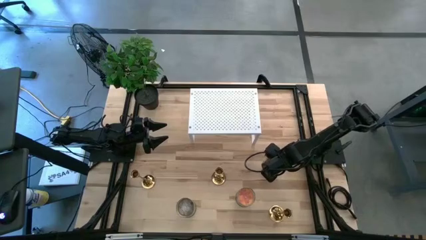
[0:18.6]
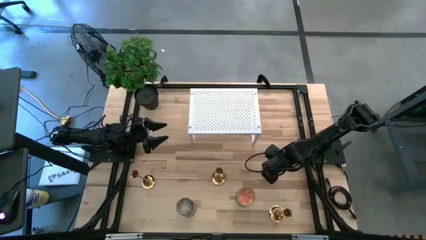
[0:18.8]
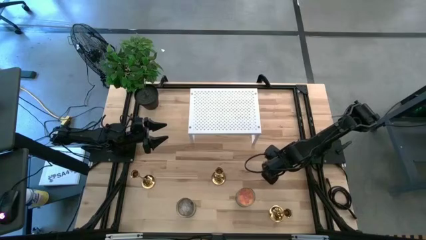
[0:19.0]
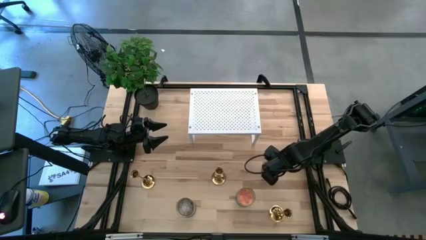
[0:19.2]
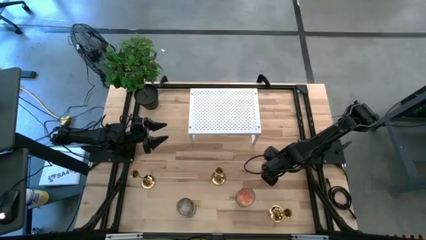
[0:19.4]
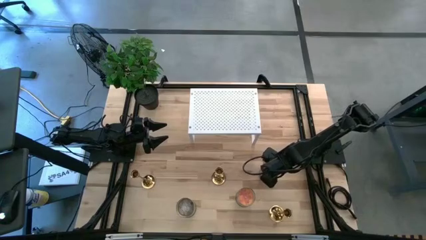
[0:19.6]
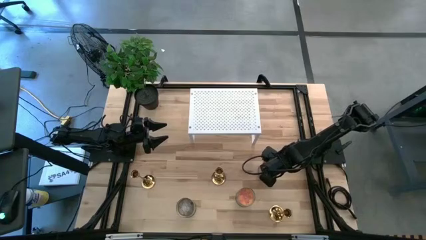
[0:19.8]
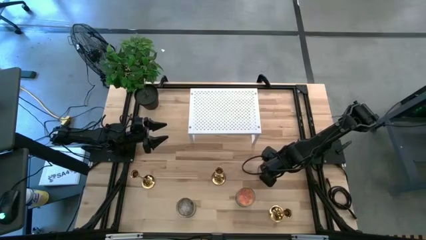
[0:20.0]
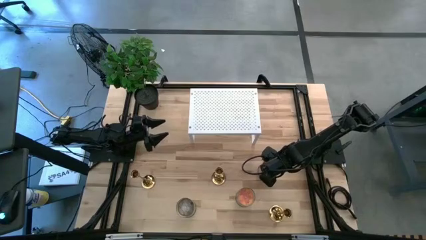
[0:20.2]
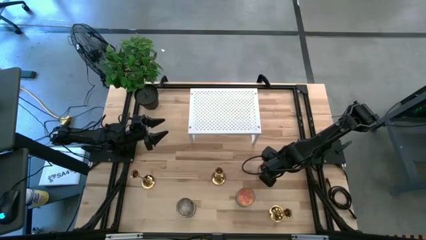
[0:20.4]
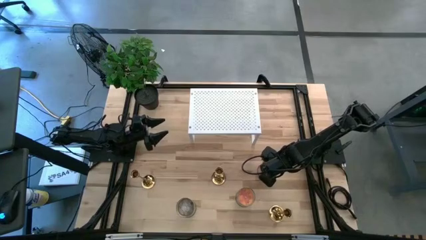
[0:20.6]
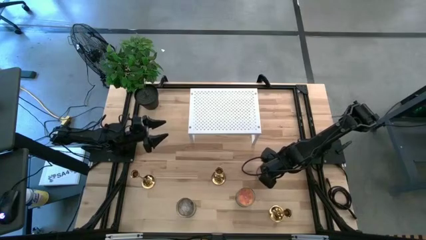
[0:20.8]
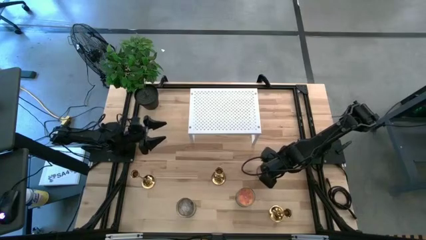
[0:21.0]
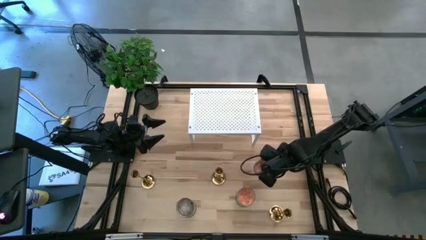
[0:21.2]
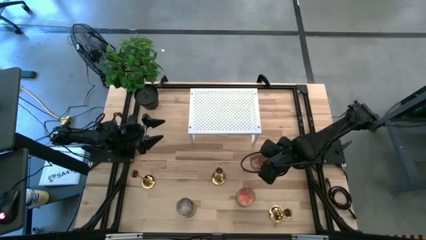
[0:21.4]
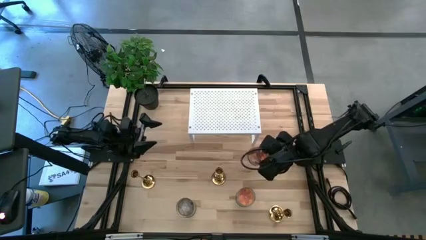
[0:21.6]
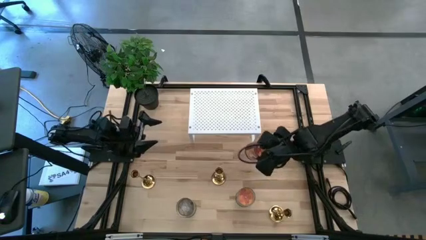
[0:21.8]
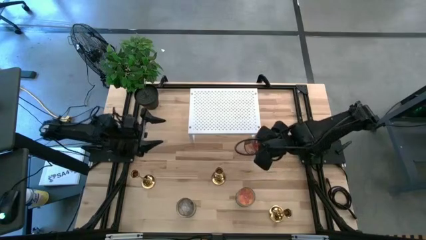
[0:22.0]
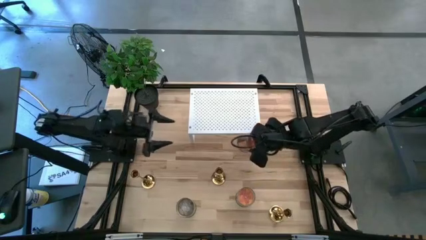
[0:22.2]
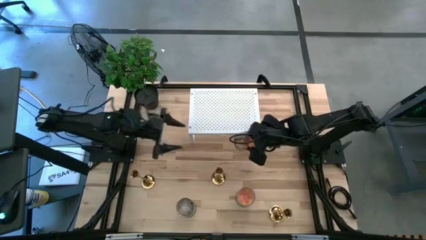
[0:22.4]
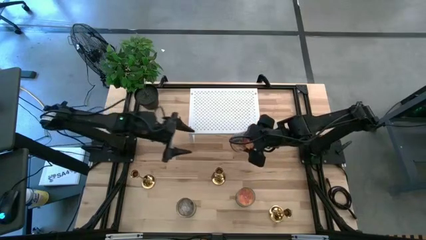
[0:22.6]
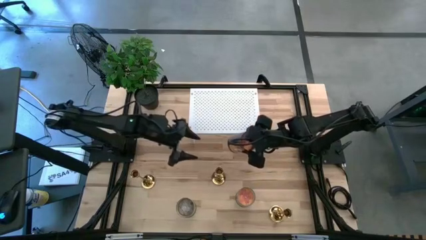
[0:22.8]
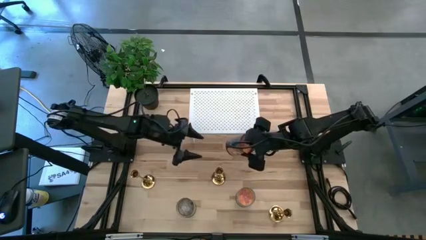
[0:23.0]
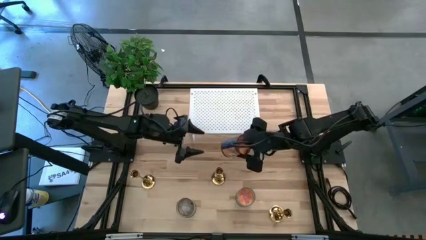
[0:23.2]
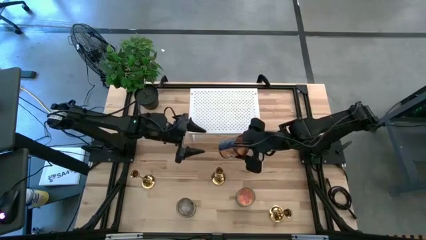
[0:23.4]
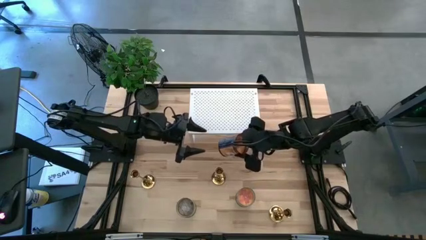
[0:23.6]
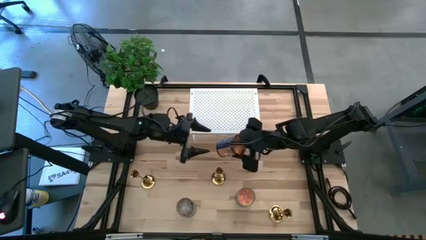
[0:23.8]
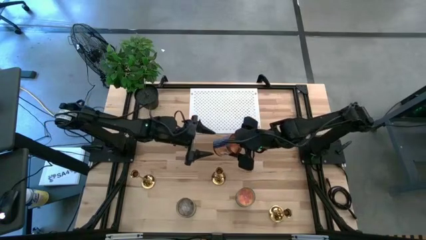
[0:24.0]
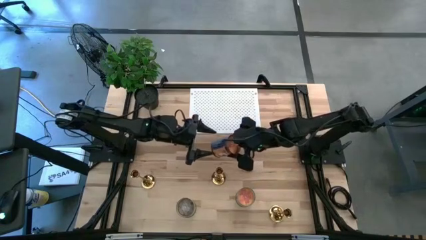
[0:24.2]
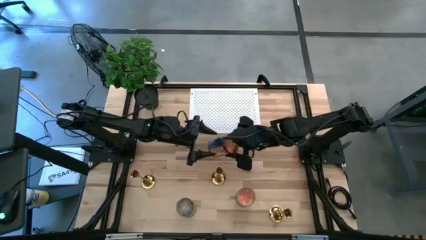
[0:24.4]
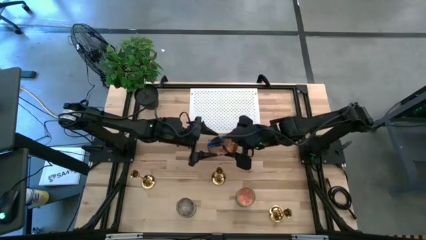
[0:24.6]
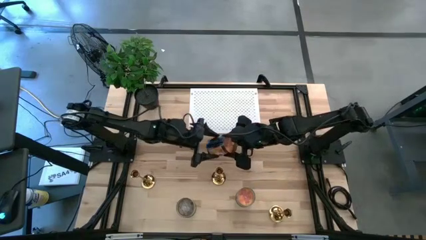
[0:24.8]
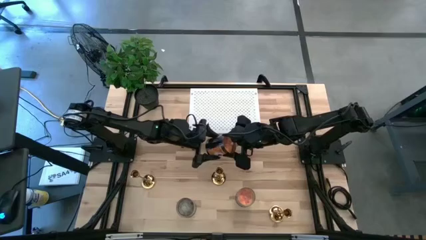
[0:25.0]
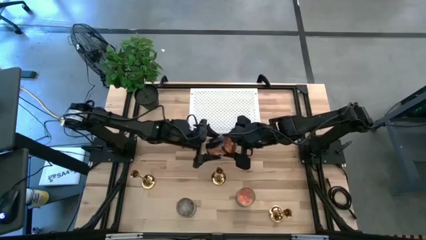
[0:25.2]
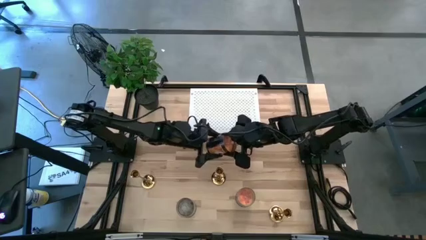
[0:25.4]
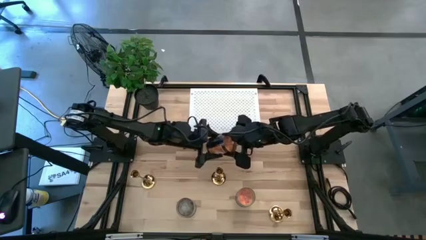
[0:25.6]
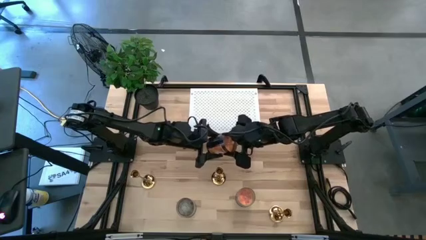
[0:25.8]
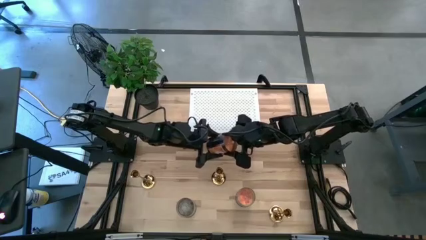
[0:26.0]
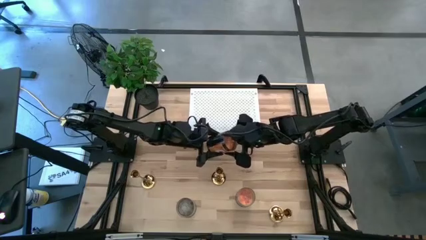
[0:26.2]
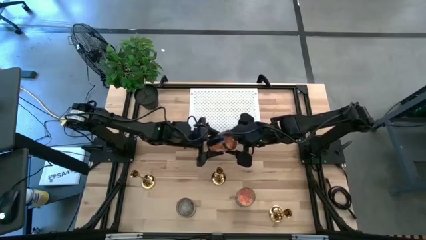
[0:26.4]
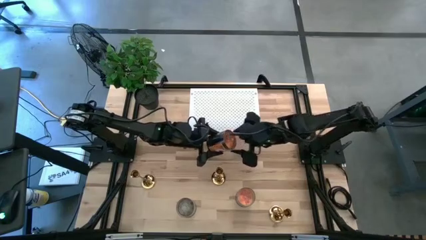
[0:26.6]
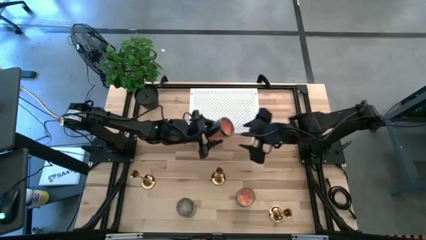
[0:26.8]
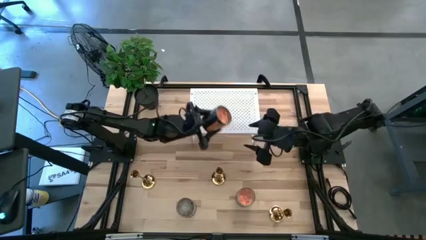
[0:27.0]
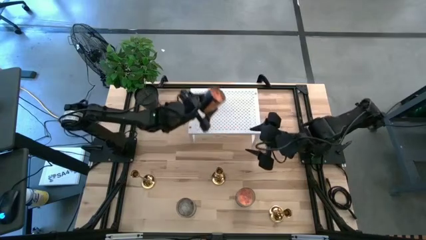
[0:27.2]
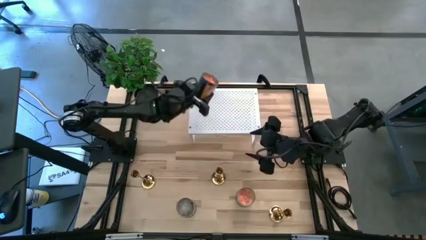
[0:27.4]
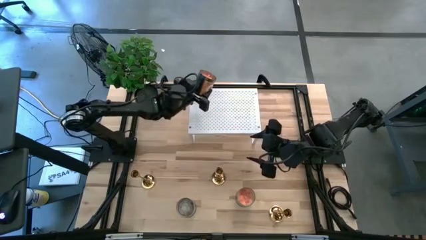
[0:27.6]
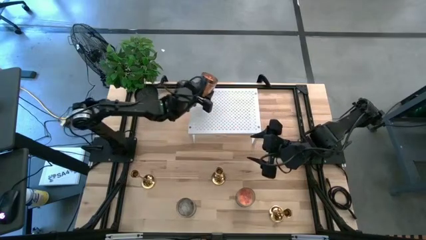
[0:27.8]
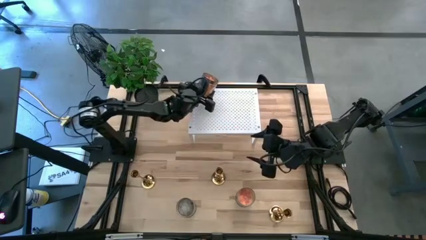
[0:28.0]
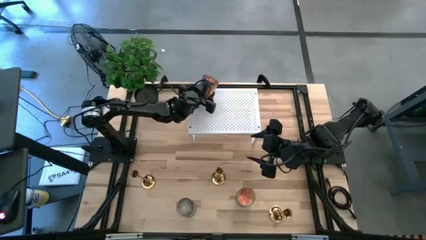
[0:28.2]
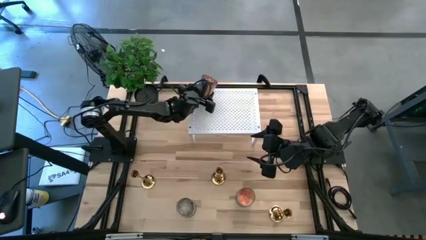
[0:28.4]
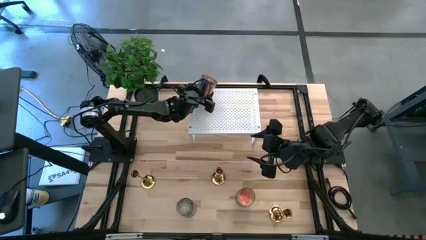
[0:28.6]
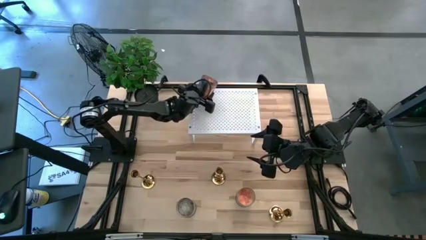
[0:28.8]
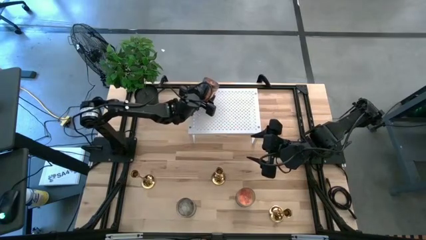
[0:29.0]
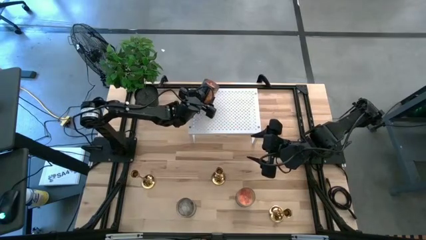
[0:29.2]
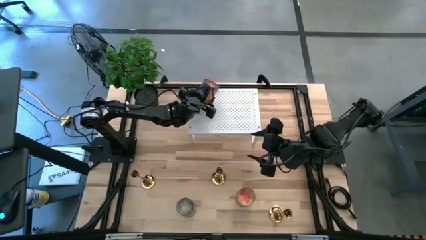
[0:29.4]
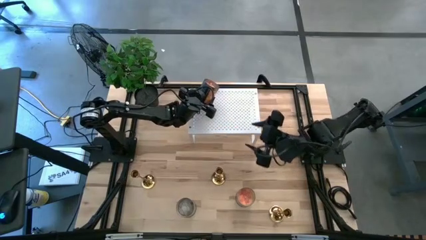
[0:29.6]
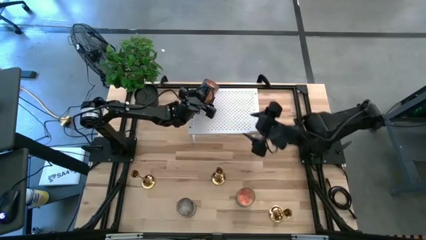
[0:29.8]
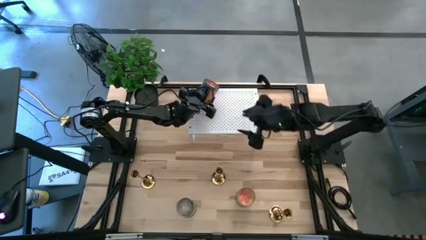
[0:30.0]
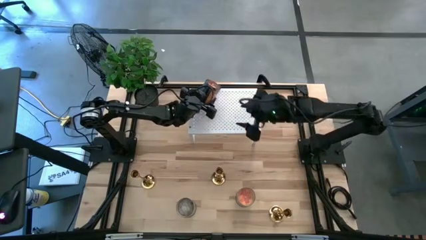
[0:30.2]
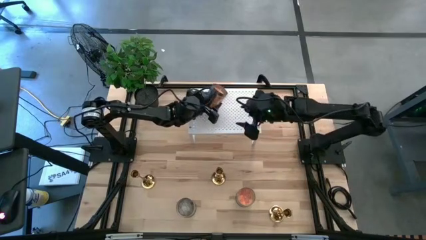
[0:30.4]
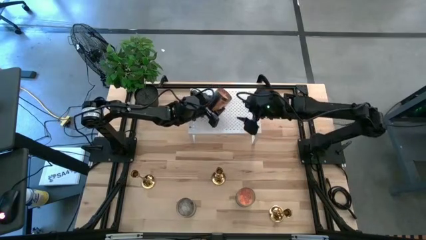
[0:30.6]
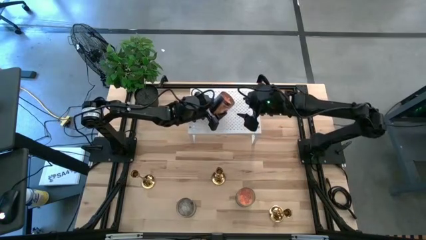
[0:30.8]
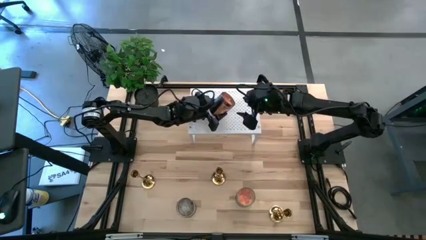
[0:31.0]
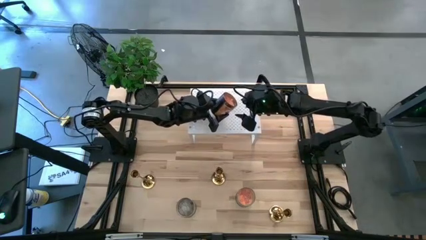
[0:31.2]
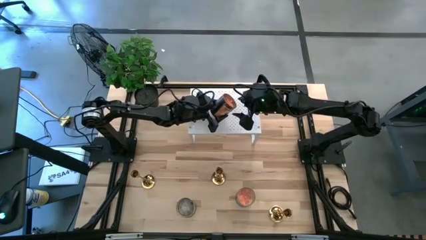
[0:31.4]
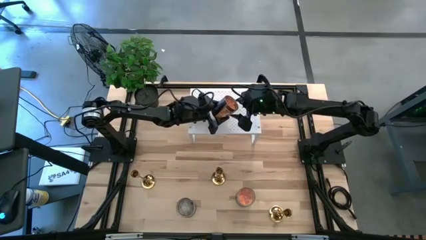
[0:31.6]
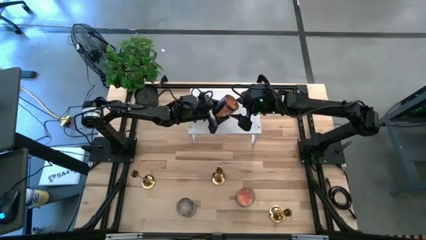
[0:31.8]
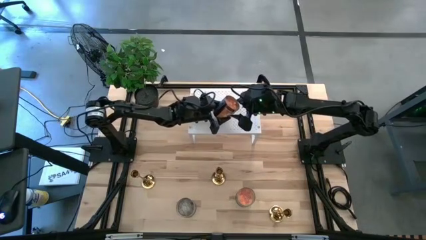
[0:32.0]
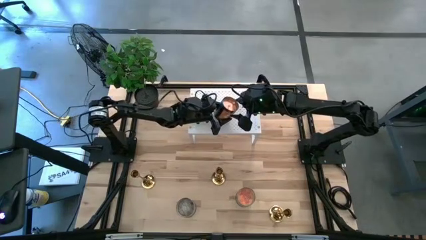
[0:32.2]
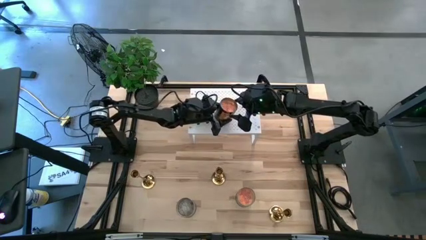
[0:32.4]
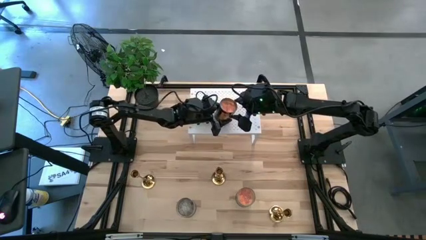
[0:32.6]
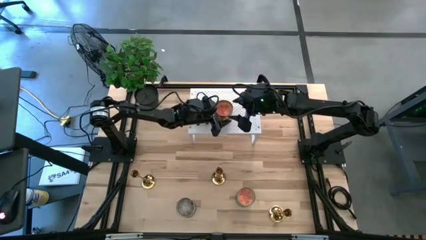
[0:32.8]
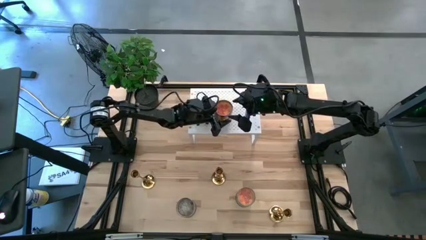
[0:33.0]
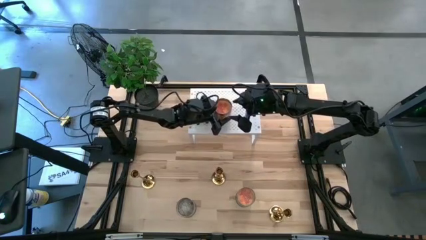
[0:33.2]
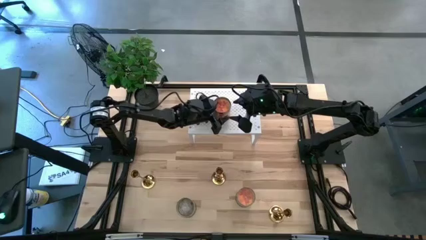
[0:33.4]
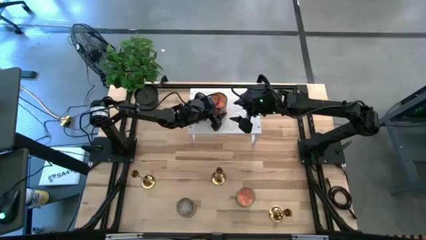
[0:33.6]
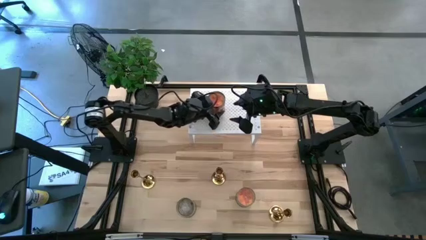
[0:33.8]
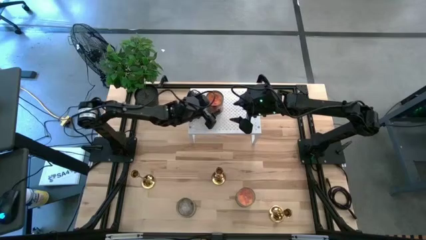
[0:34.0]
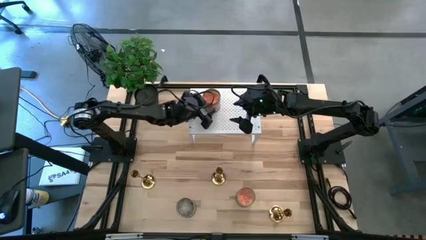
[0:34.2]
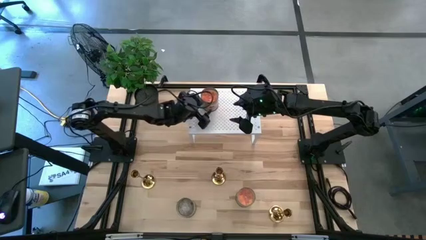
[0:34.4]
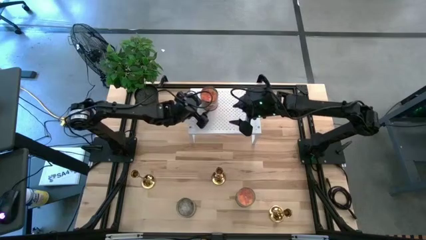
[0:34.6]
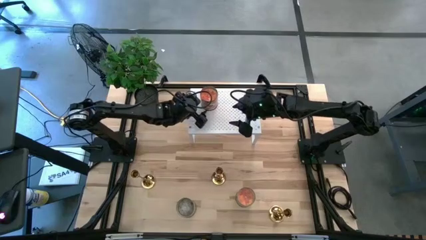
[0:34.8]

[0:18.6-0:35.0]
Task: Pick & Place candle stick holders
Put the top right orange scented candle on the shelf
